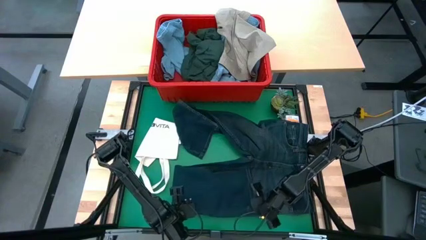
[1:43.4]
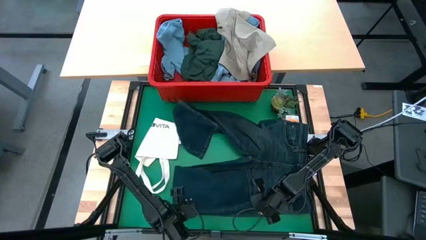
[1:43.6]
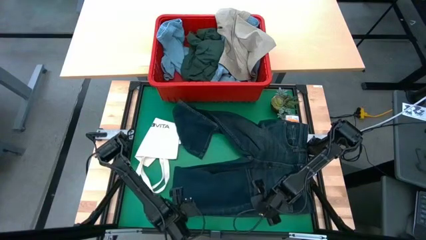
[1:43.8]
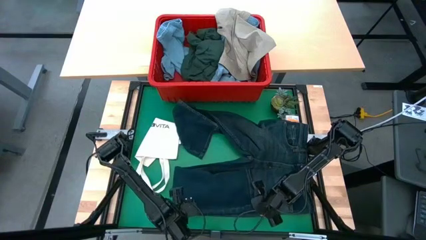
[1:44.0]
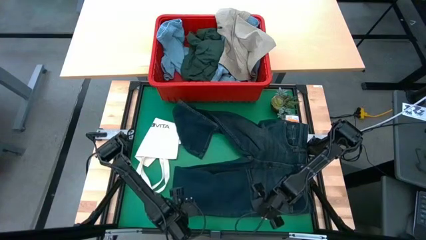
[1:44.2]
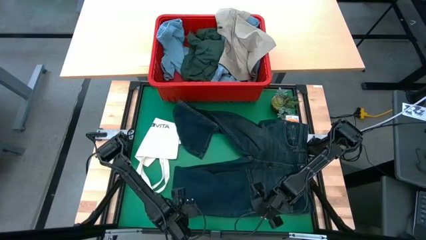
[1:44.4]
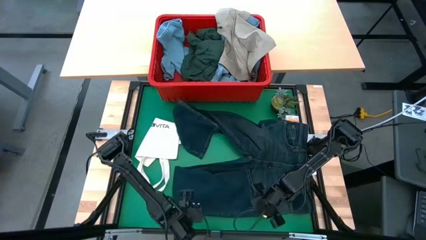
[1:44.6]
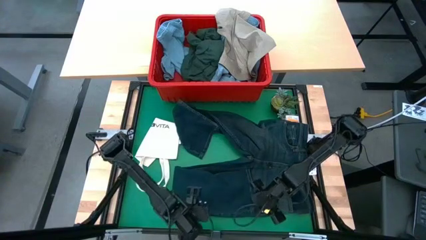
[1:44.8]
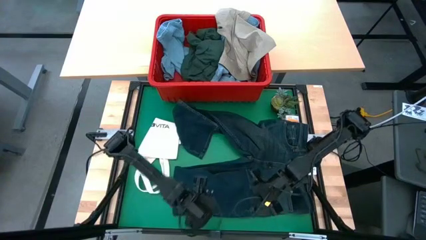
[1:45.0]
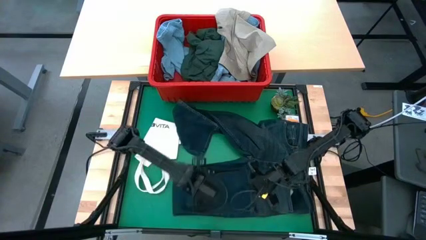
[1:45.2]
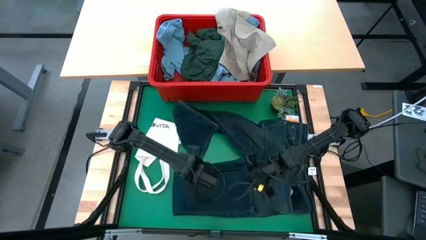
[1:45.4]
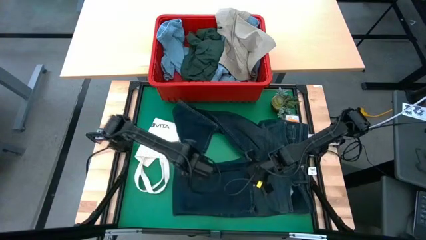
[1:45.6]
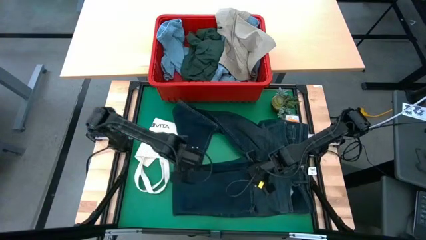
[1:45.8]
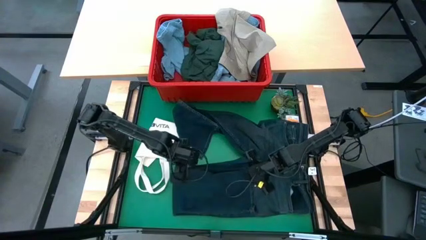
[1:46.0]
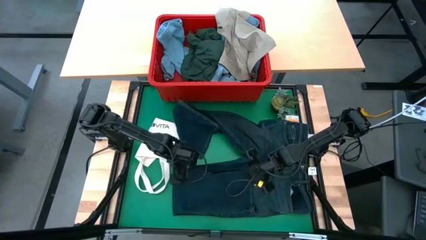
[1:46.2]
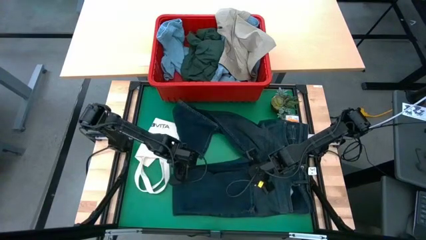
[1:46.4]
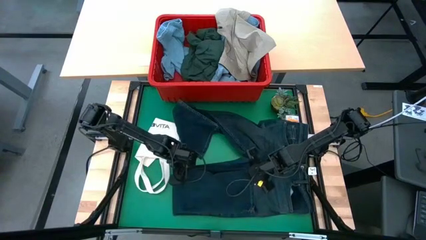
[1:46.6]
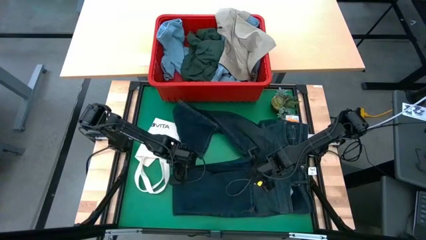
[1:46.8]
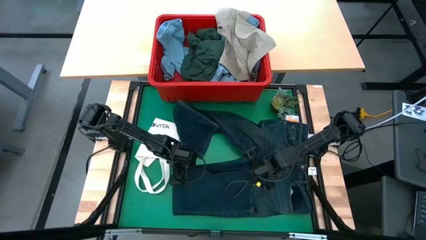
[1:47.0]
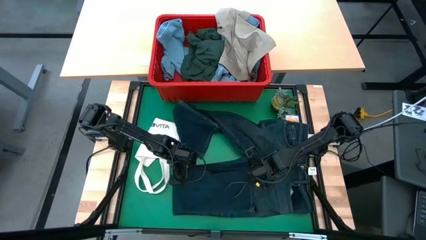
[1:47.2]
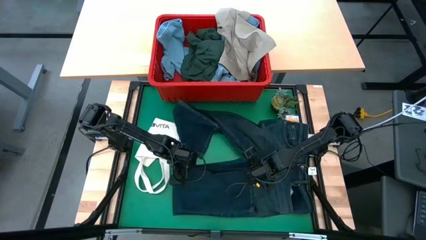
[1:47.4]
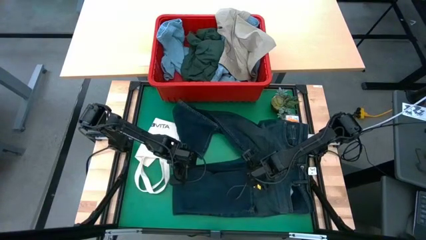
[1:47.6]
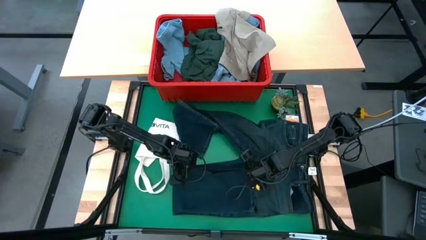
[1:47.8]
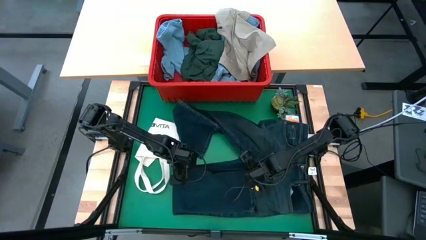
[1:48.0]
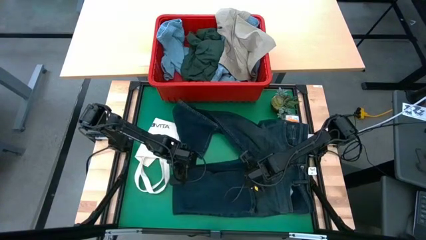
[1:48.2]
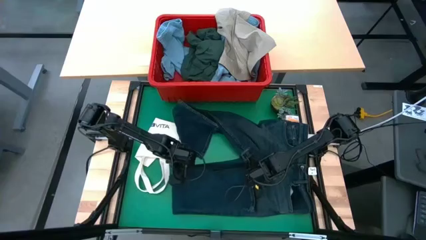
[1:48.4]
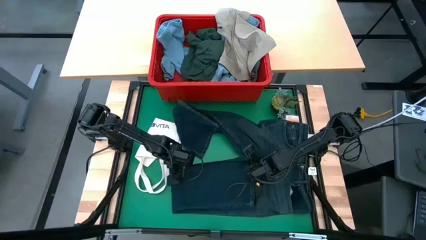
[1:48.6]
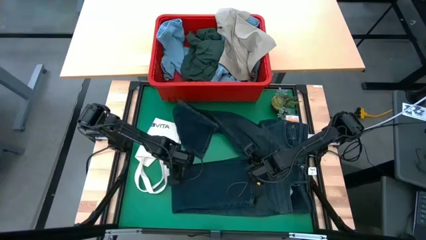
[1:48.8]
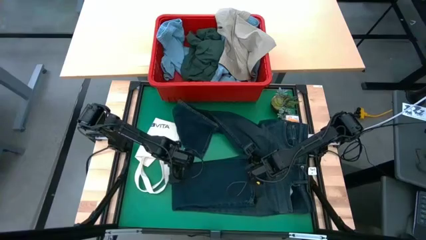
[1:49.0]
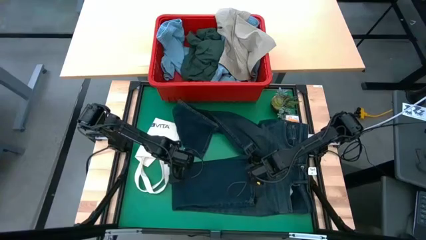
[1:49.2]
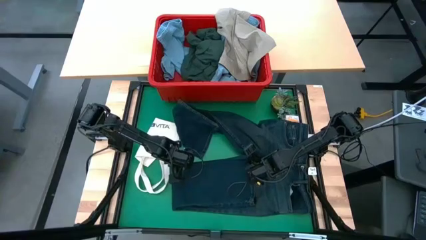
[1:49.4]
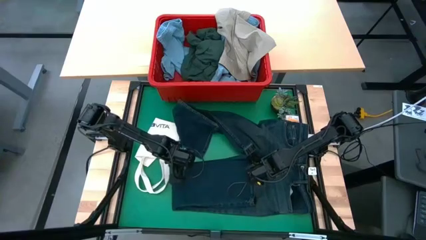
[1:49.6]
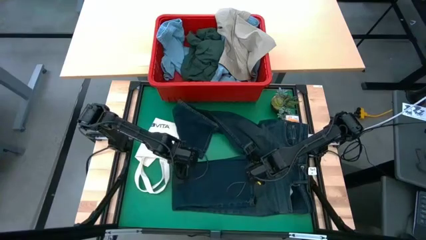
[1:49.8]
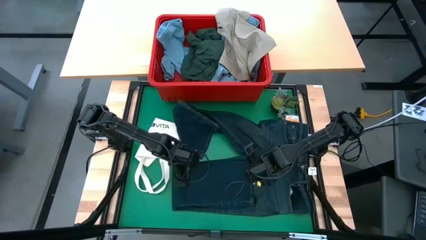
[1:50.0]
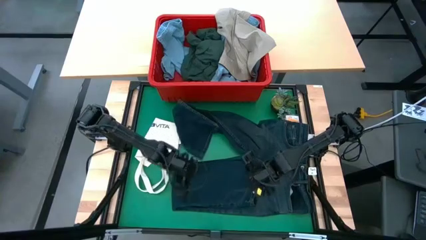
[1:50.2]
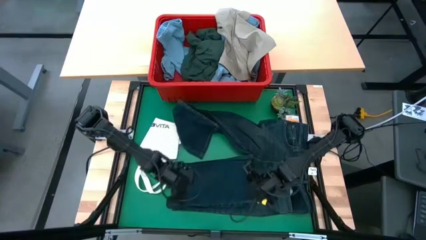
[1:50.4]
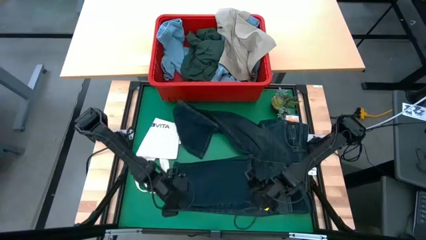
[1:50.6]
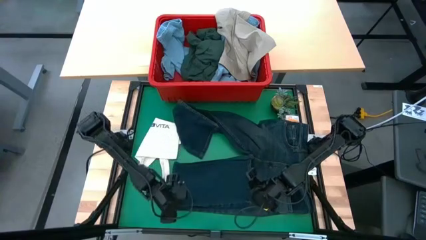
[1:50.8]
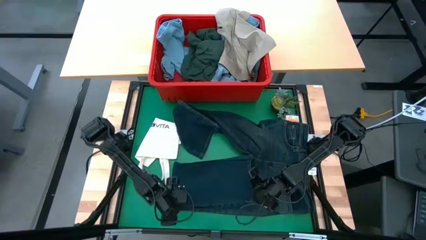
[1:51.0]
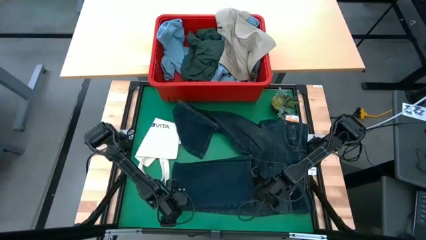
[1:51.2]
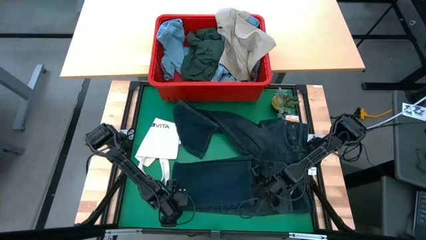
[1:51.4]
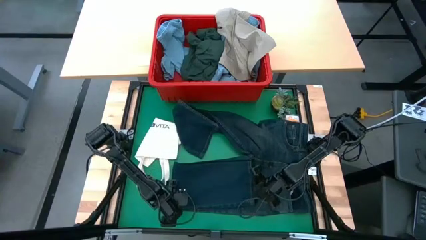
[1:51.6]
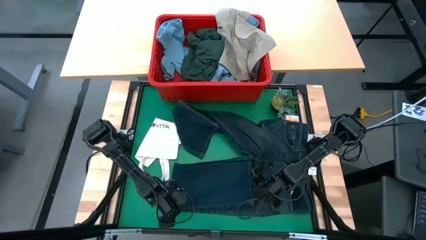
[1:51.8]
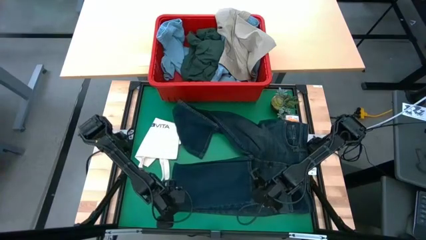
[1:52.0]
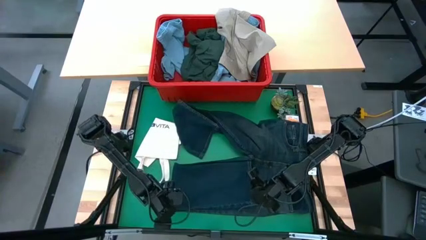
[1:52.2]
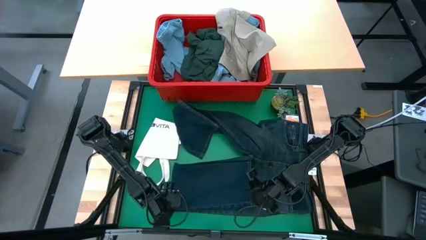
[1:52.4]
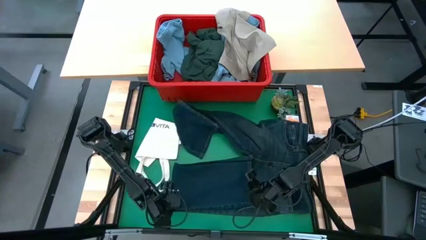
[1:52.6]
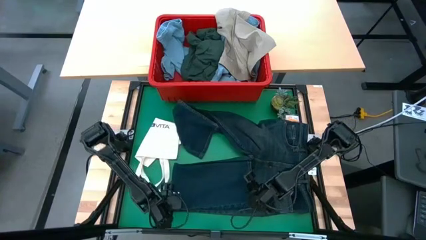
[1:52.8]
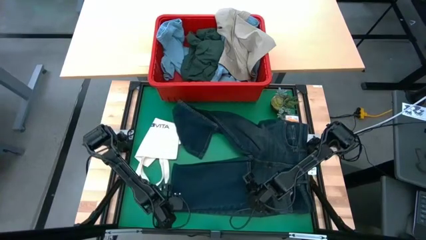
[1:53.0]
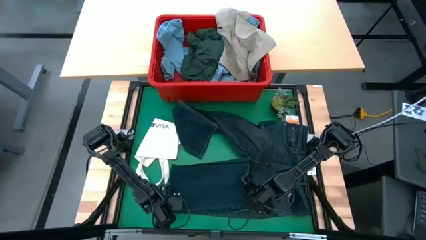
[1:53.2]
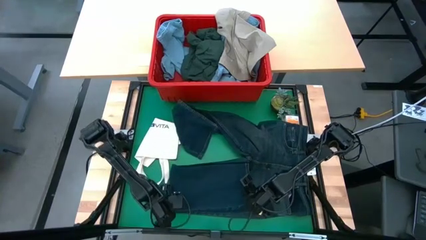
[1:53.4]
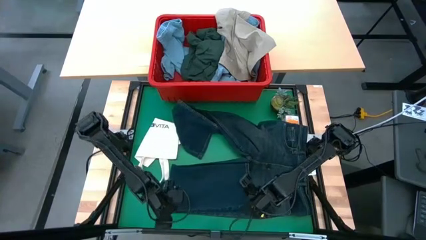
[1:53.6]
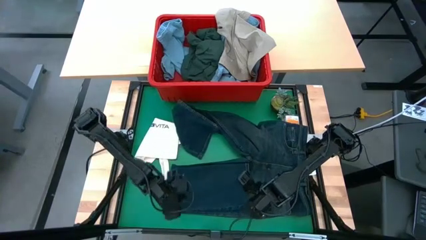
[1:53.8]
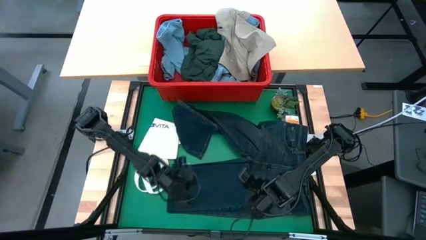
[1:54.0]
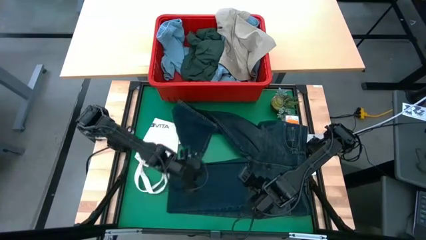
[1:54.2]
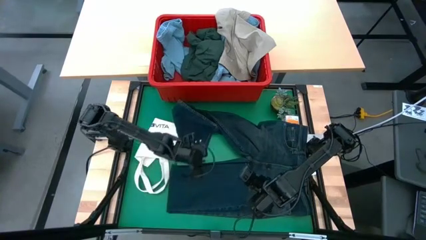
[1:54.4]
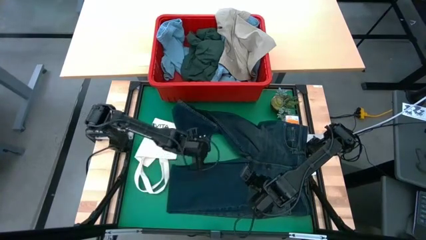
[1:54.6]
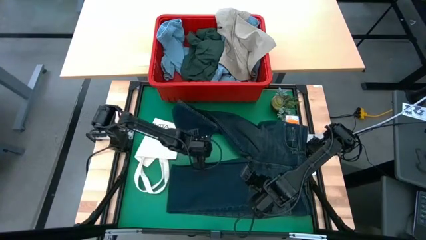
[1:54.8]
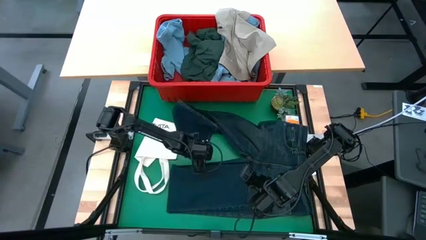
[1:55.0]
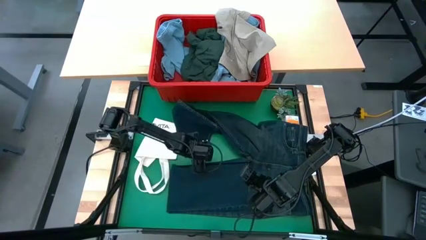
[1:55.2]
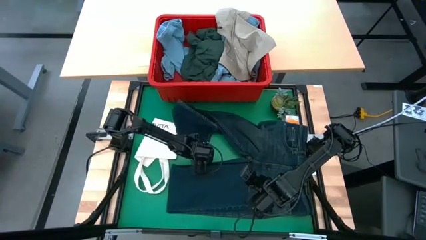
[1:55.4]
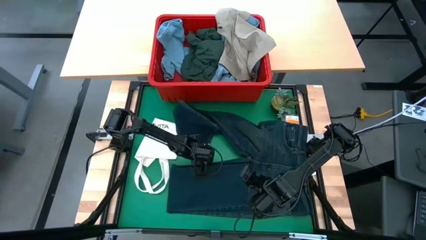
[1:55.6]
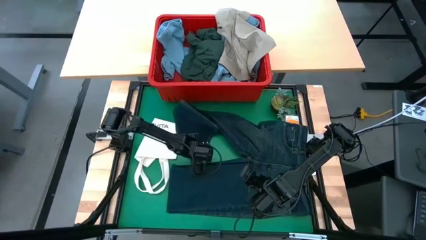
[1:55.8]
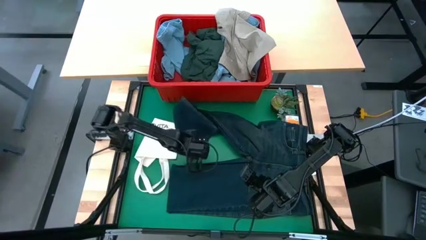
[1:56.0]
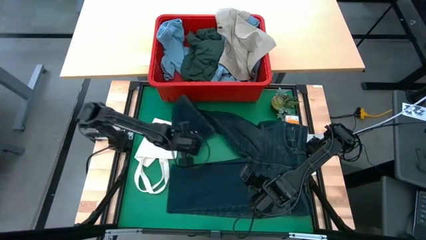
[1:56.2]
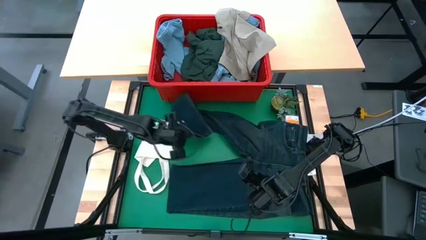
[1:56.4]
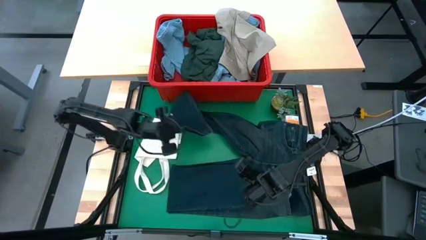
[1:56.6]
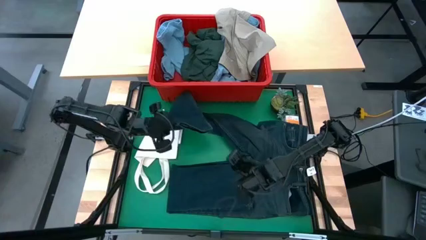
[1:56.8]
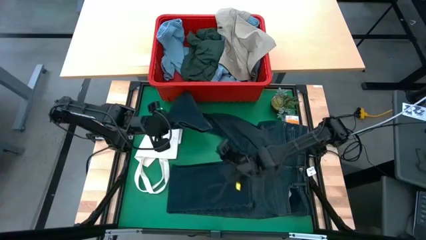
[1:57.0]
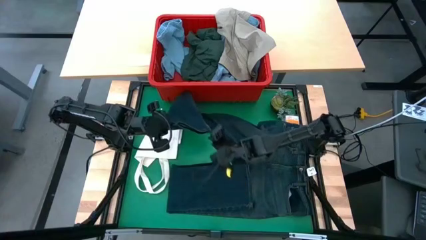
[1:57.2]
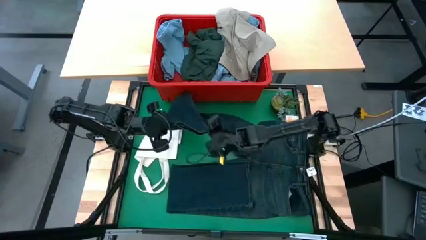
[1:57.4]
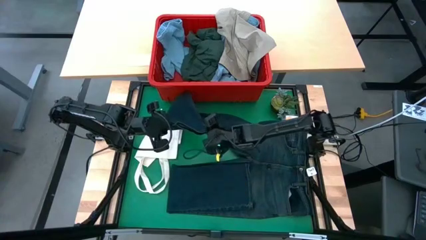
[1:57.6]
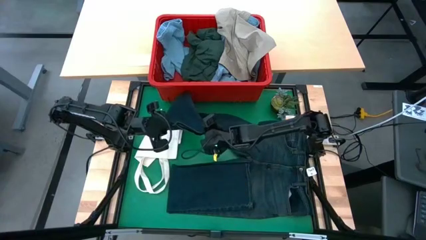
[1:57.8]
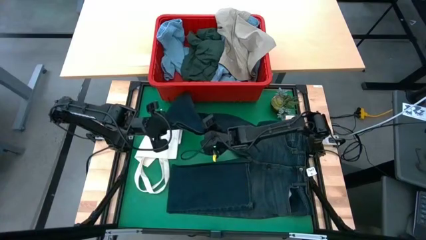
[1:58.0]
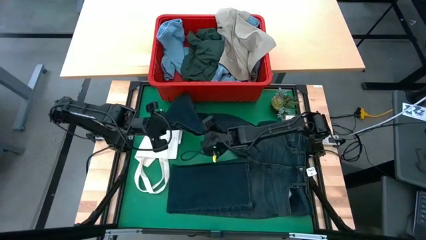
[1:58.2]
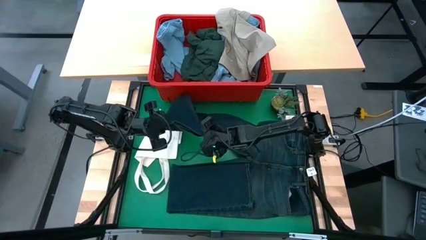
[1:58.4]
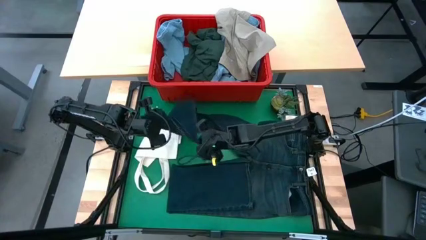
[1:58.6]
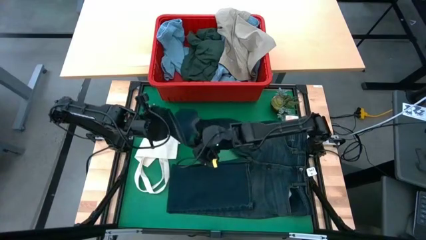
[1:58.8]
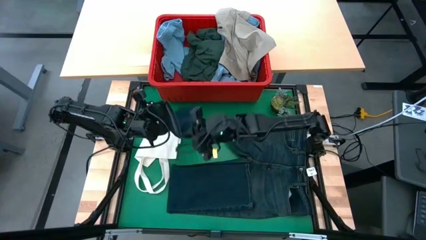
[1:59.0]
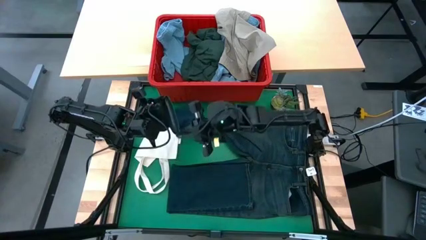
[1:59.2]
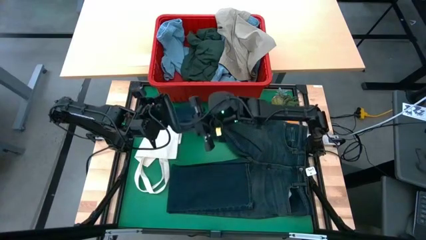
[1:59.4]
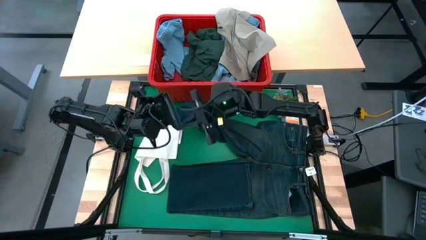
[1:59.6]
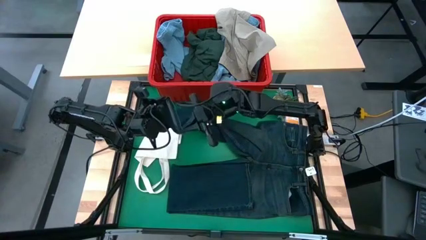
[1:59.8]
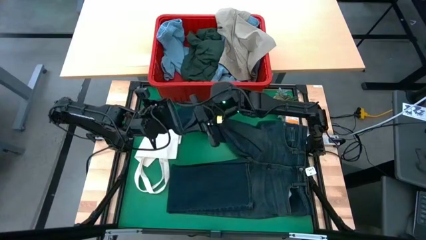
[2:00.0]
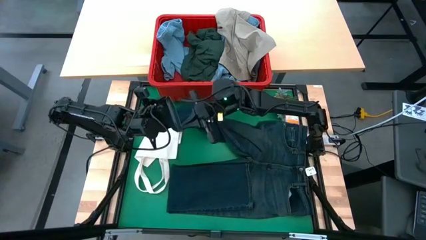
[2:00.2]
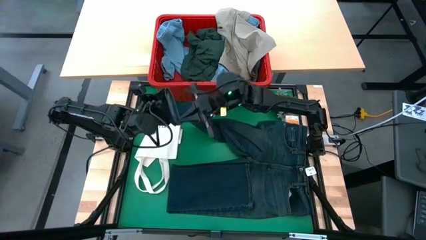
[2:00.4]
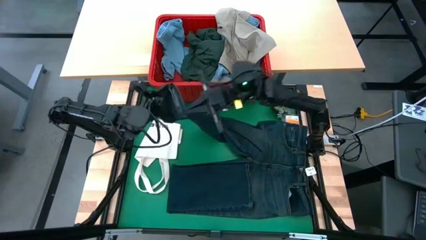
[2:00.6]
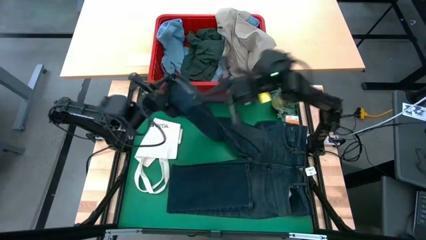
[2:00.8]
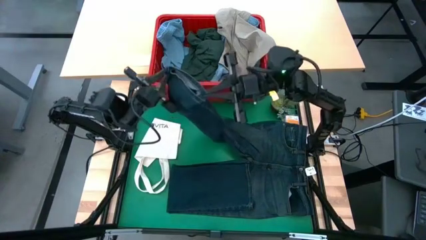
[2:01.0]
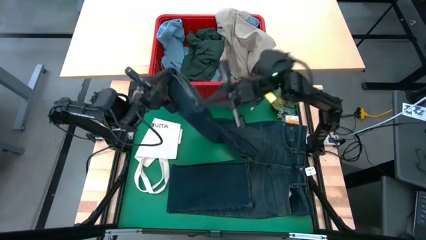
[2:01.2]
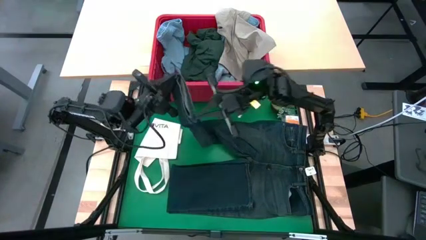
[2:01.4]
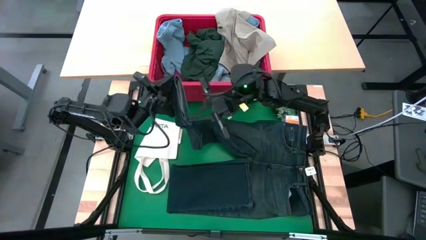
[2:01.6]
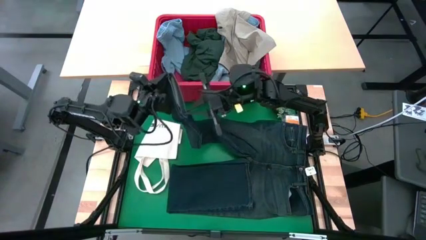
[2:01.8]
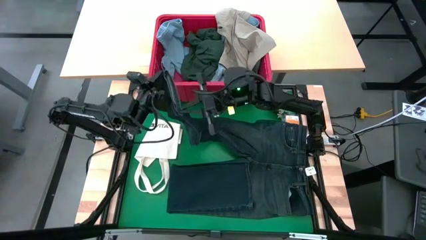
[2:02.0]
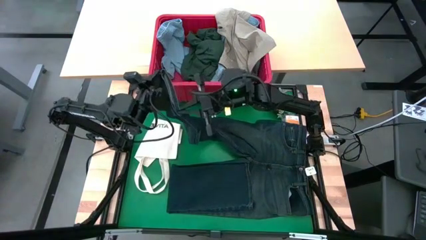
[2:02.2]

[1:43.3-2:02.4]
Task: Fold laundry
Fold the dark blue pants
